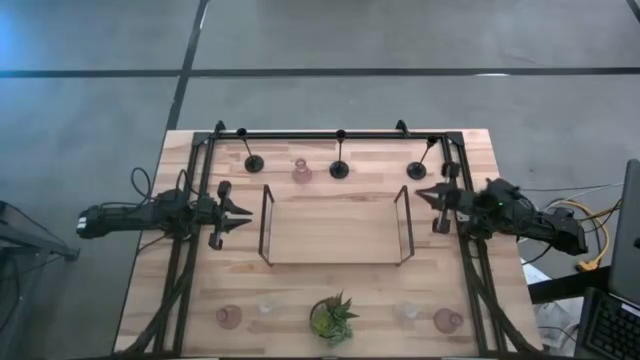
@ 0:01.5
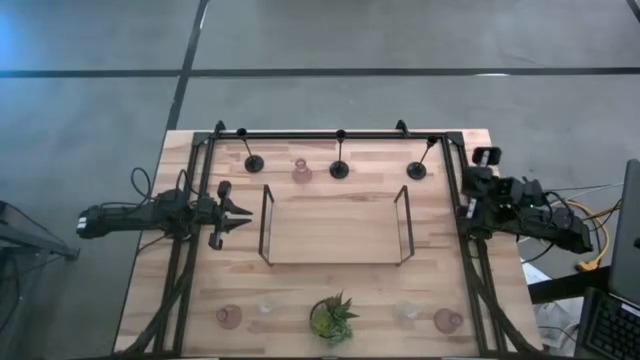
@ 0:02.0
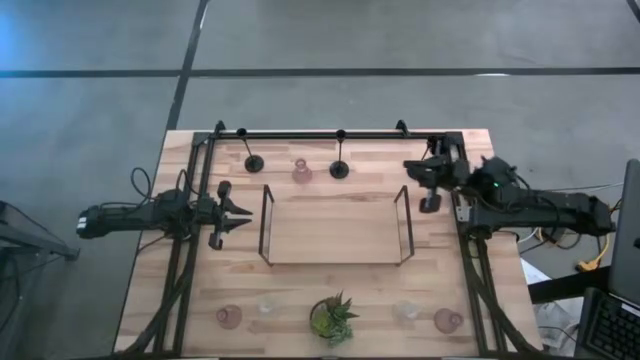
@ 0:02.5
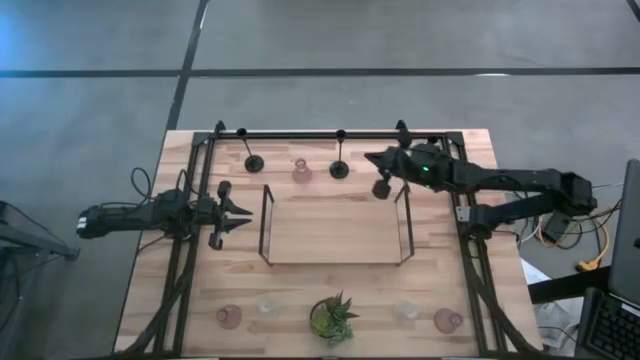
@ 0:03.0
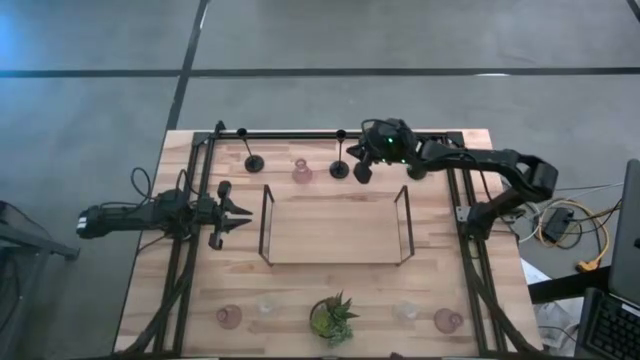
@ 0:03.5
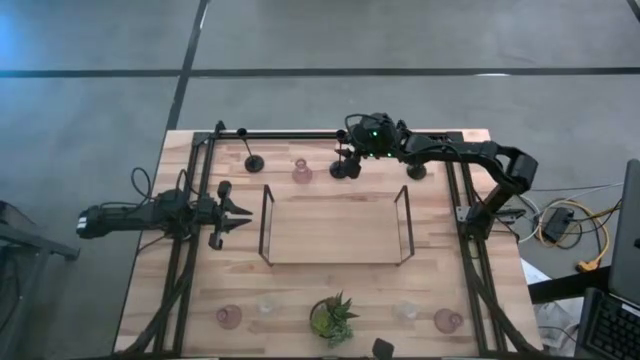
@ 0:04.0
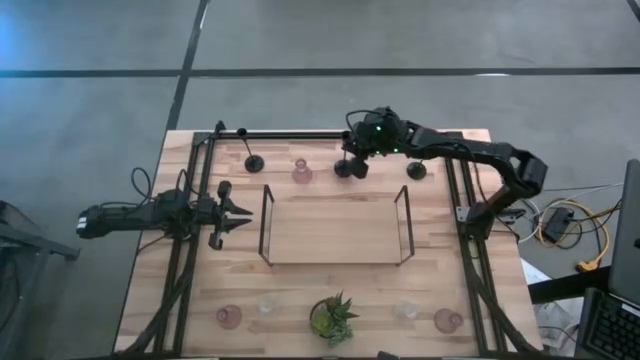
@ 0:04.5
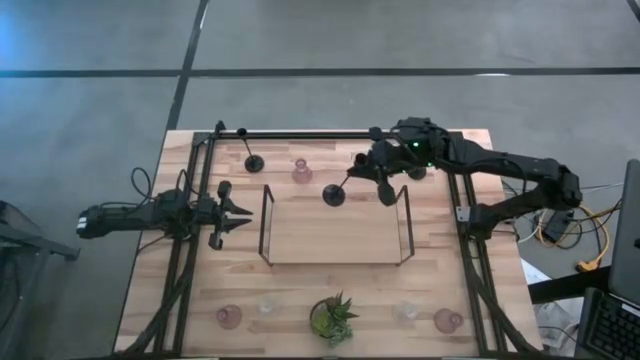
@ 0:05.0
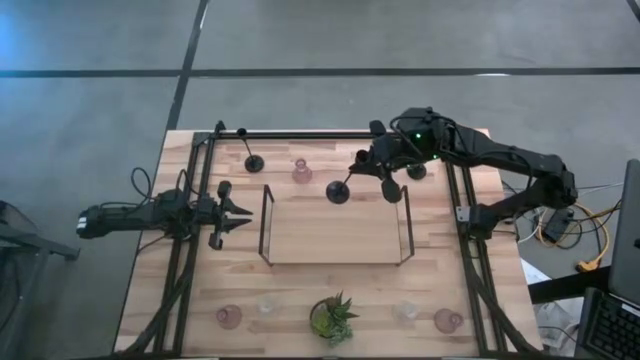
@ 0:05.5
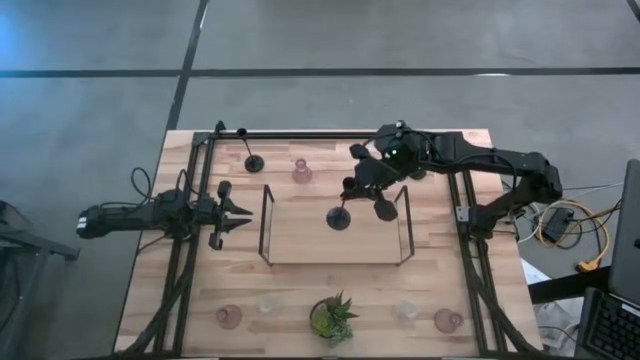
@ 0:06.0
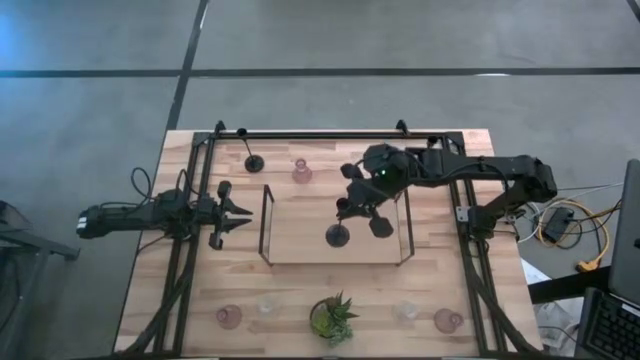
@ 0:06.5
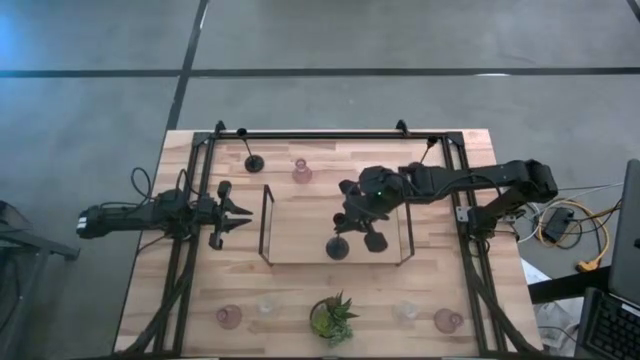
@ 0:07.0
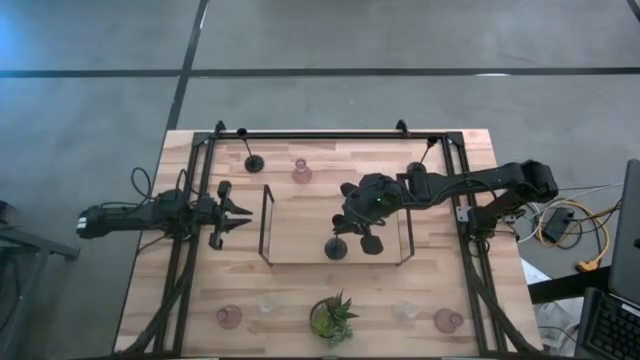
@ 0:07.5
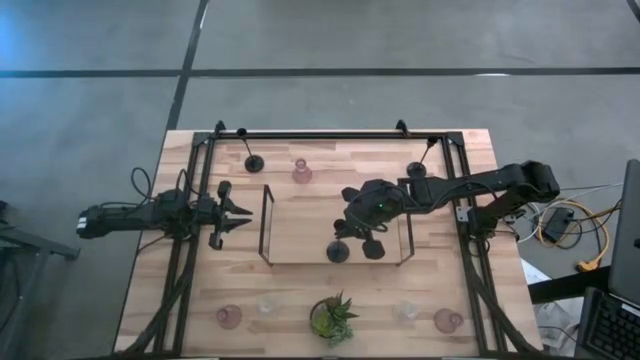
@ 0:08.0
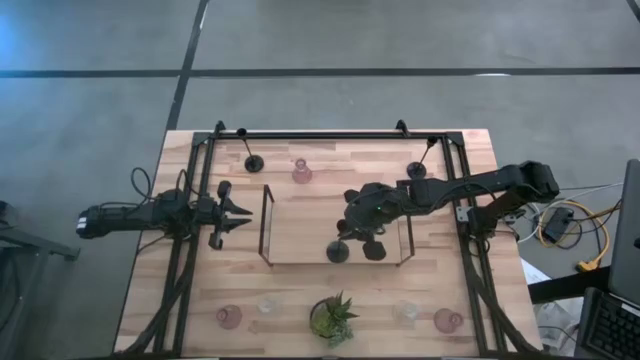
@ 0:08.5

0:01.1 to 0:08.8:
Task: Pick & Place candle stick holders
Put the middle black candle holder on the shelf

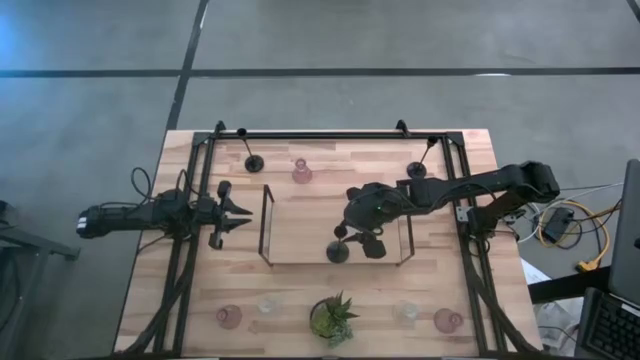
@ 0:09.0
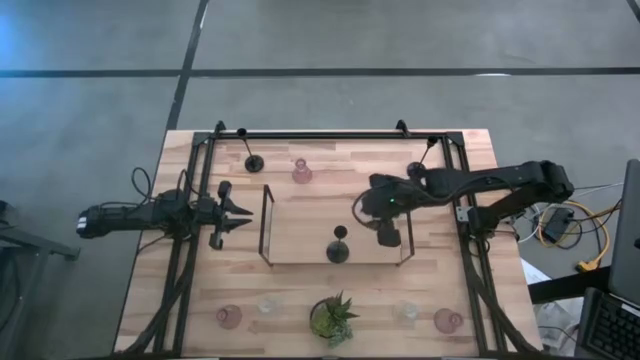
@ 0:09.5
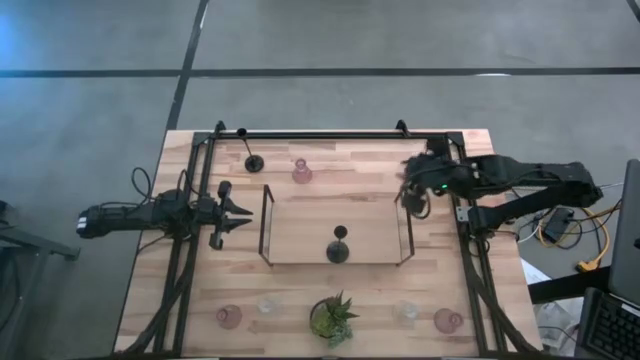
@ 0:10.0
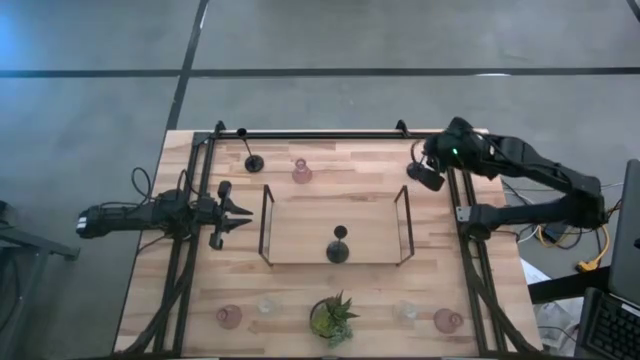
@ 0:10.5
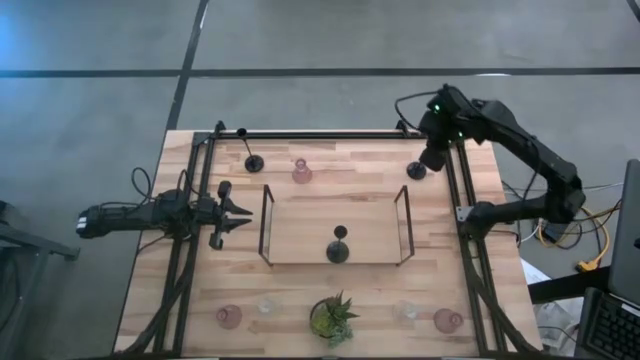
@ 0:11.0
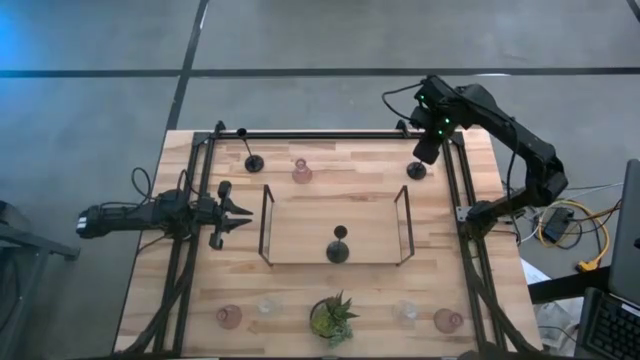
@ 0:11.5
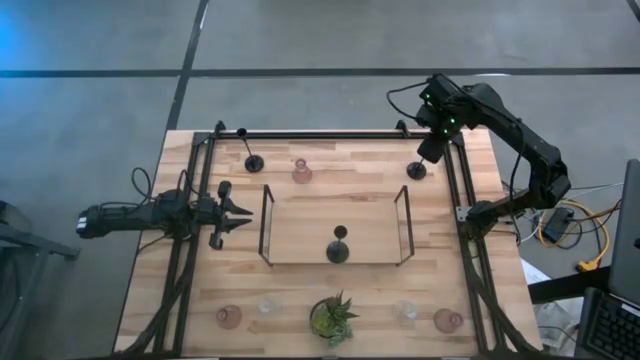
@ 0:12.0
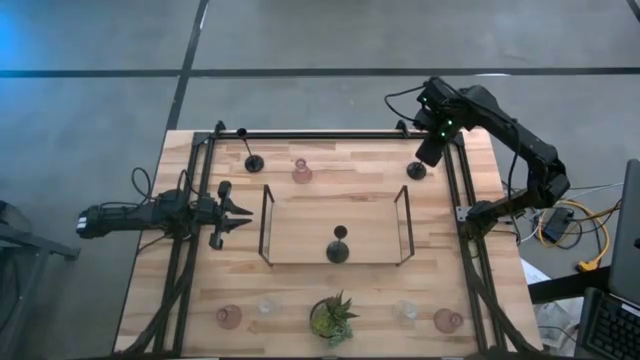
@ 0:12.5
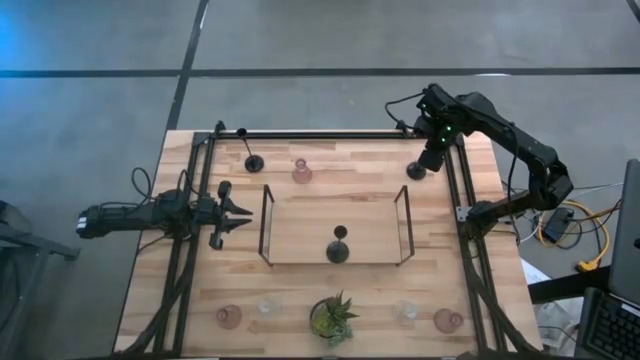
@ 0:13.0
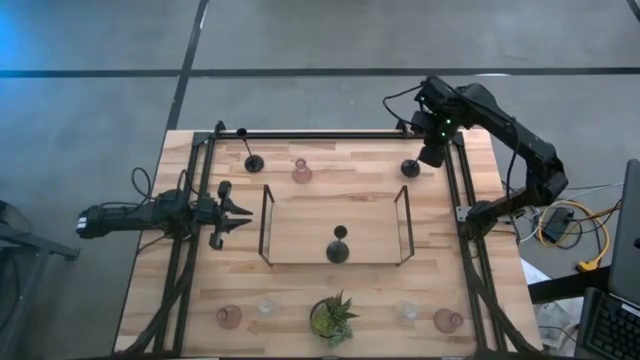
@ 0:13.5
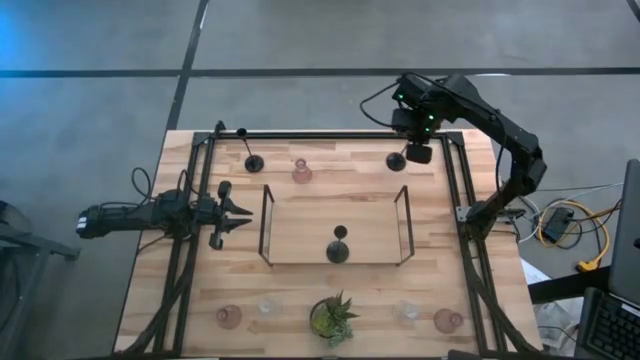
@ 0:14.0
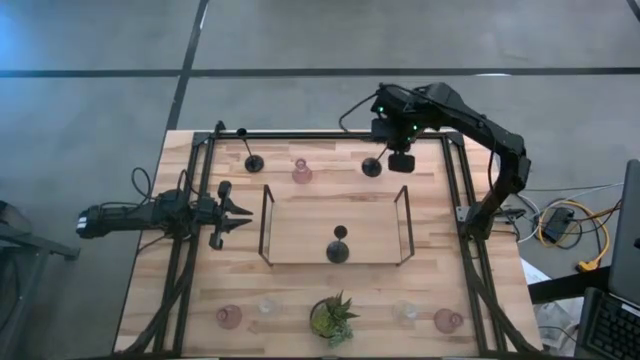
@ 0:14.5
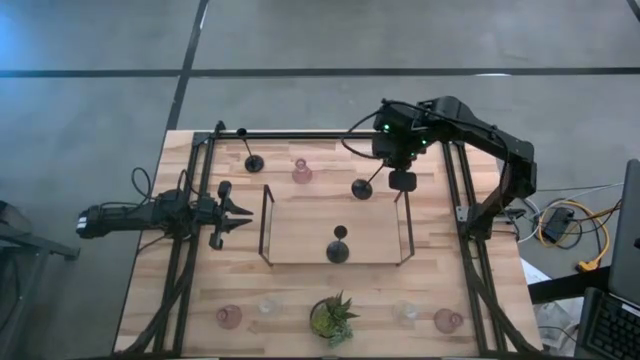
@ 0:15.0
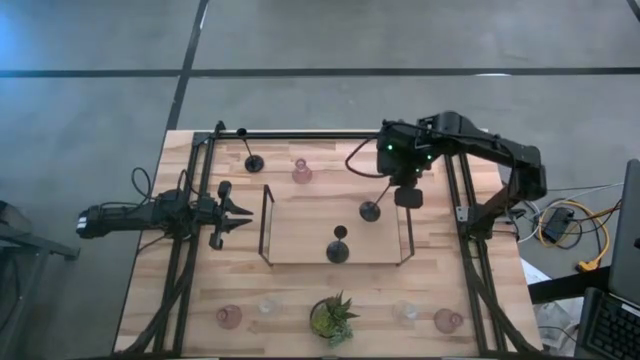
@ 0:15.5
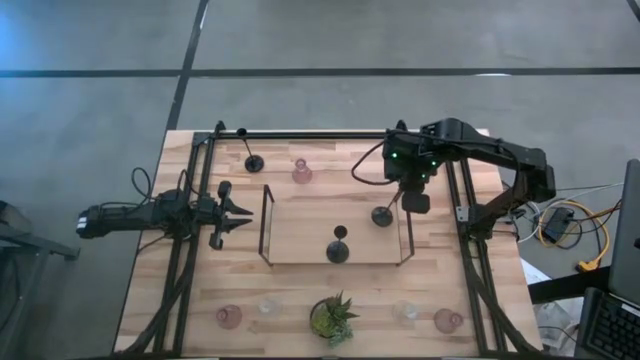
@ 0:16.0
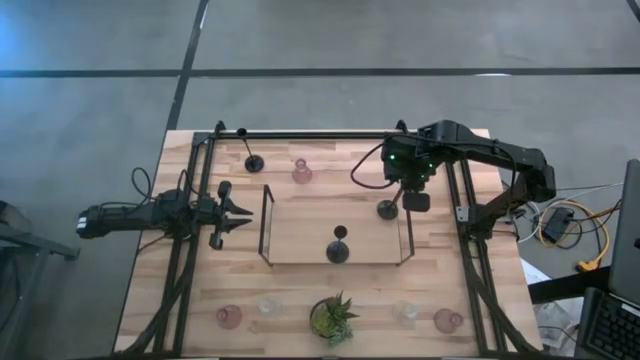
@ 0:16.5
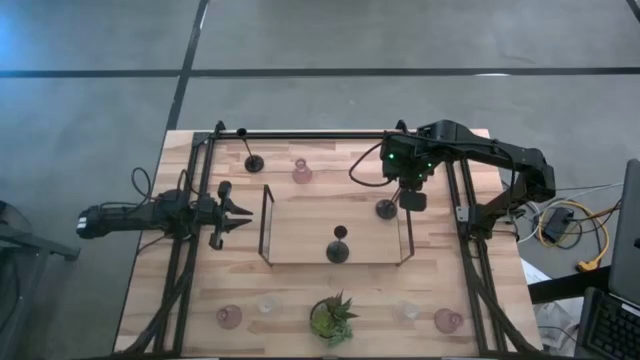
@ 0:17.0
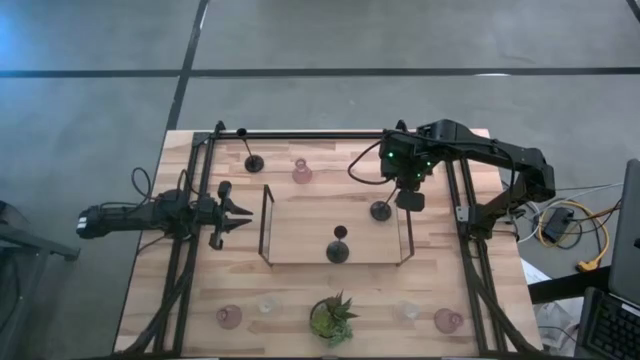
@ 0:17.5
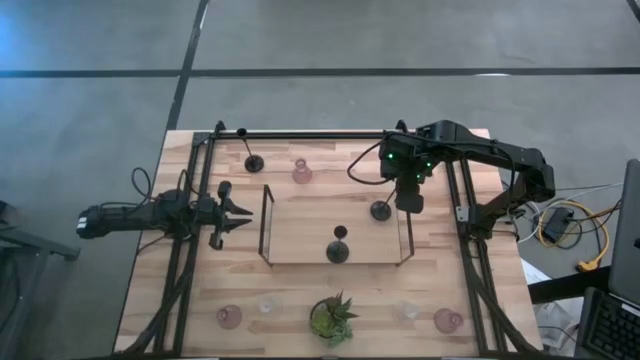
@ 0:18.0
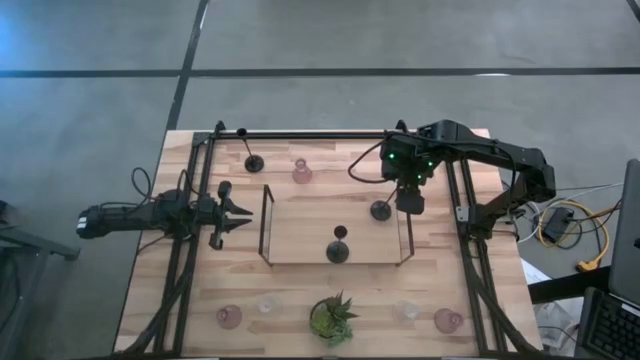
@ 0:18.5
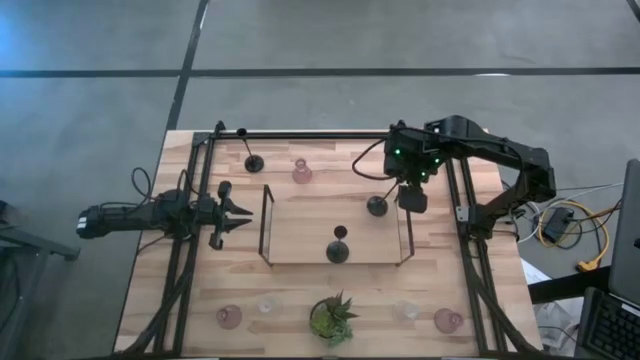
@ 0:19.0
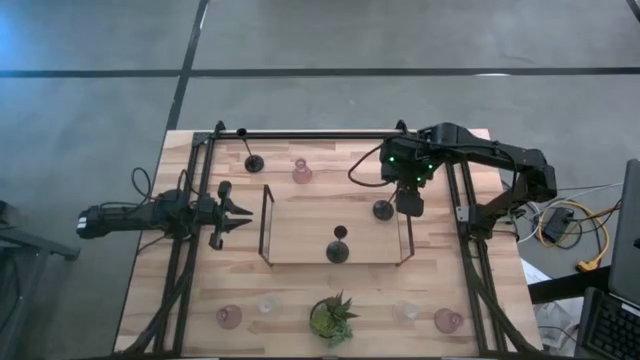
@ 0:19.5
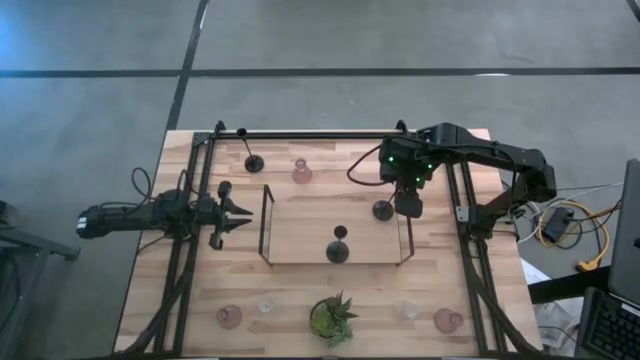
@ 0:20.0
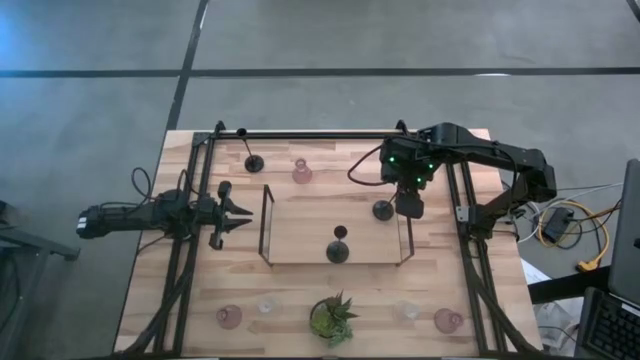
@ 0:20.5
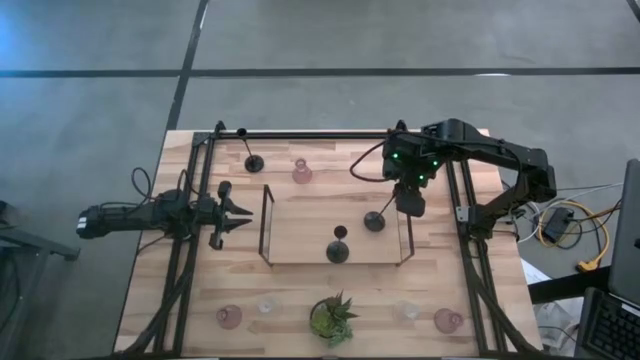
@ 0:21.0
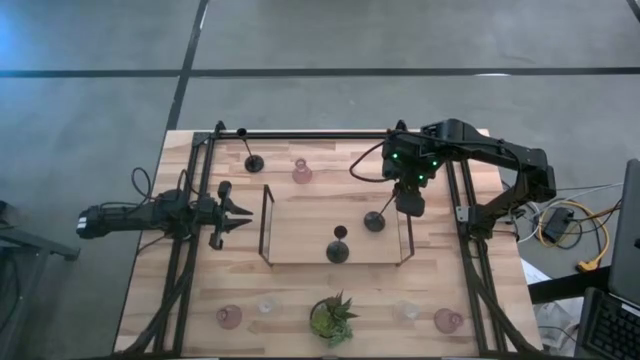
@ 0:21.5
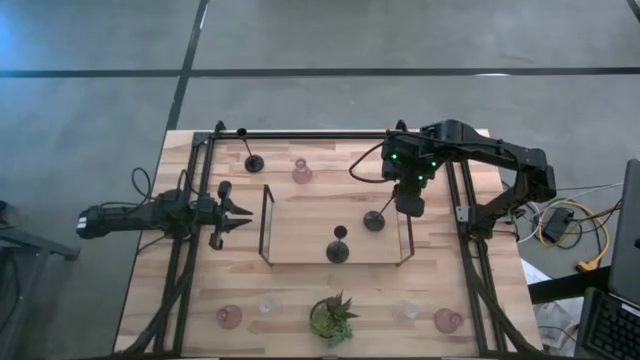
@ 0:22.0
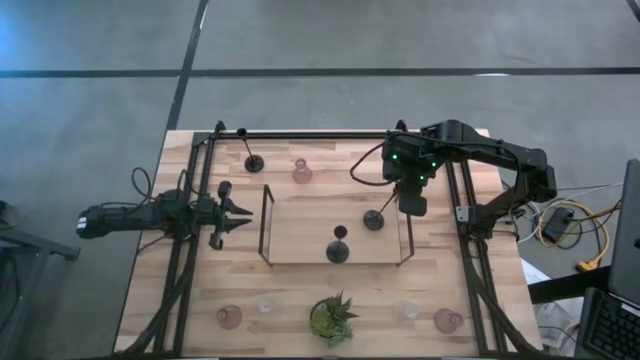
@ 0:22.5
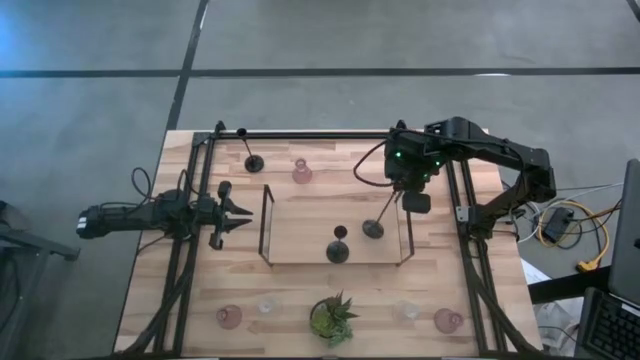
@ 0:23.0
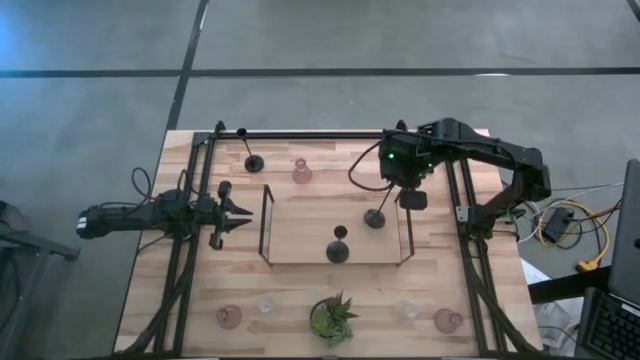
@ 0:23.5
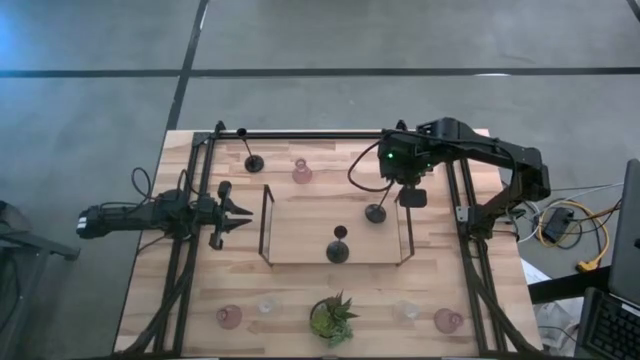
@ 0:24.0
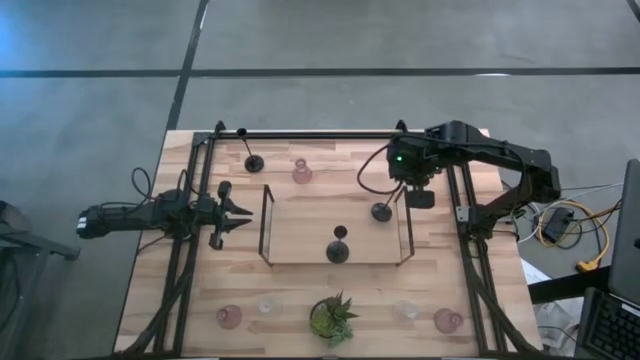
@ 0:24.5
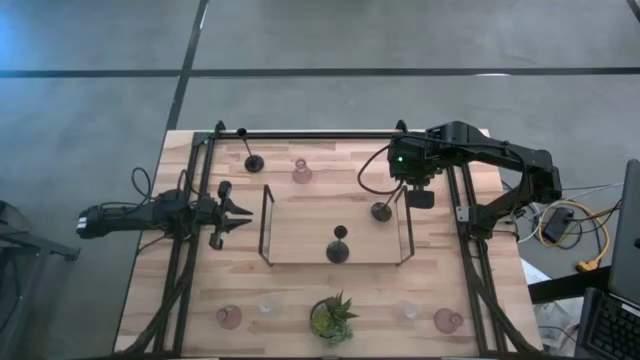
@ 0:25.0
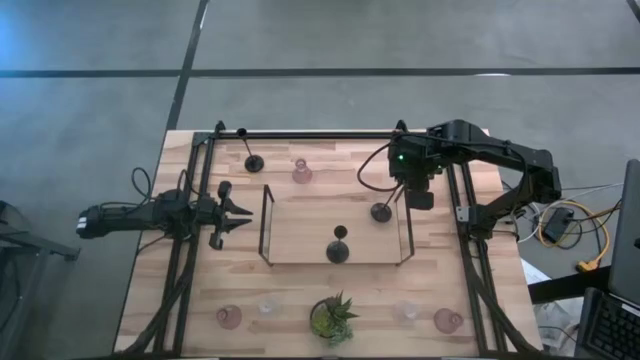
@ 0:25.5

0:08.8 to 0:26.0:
Put the right black candle holder on the shelf
